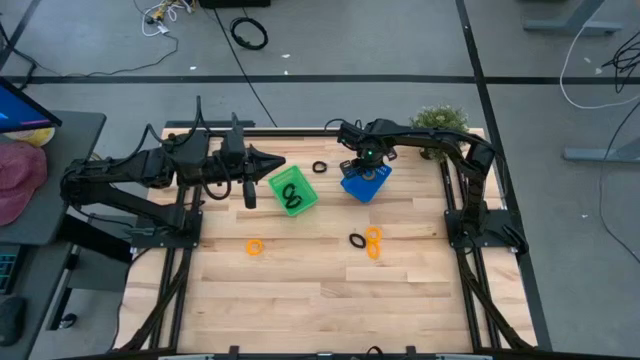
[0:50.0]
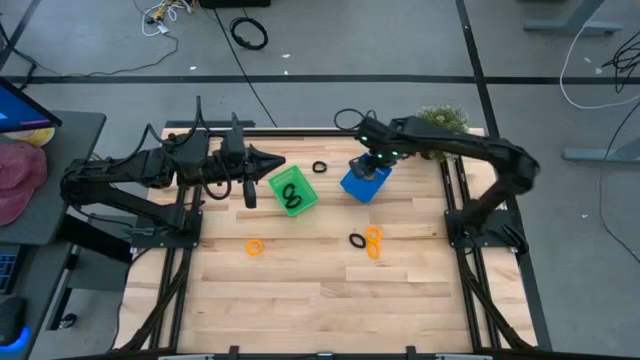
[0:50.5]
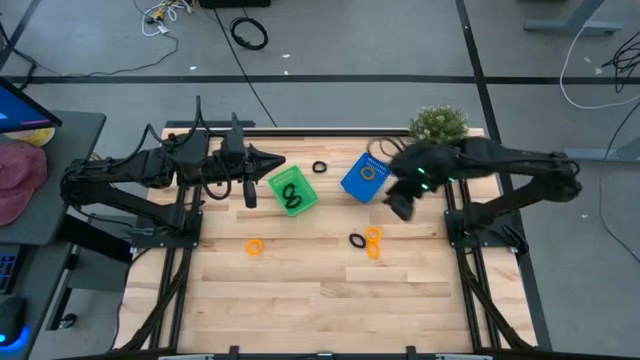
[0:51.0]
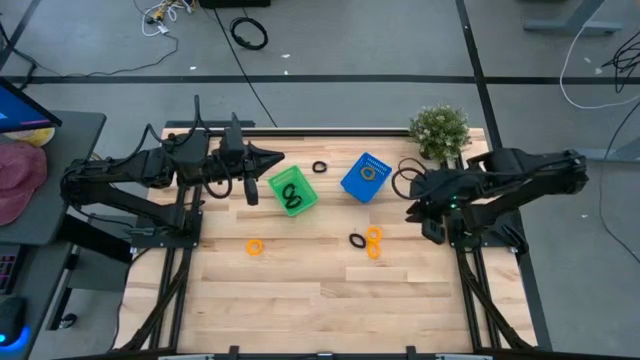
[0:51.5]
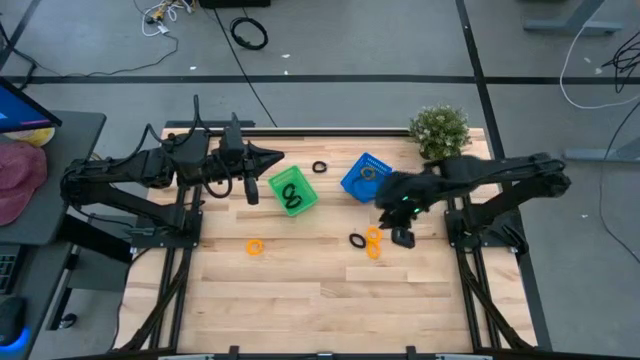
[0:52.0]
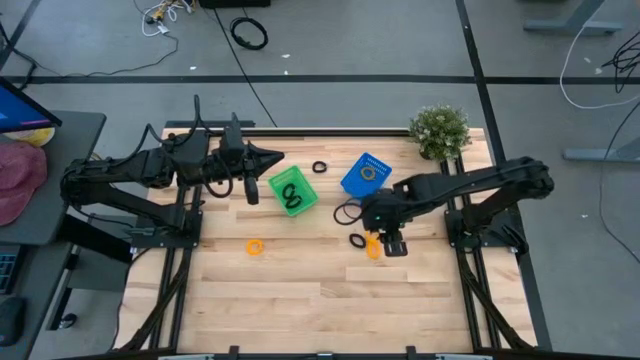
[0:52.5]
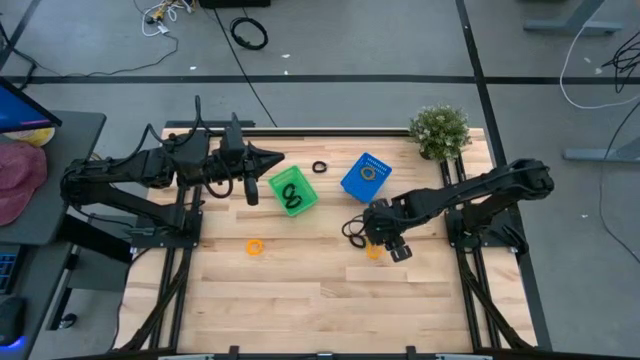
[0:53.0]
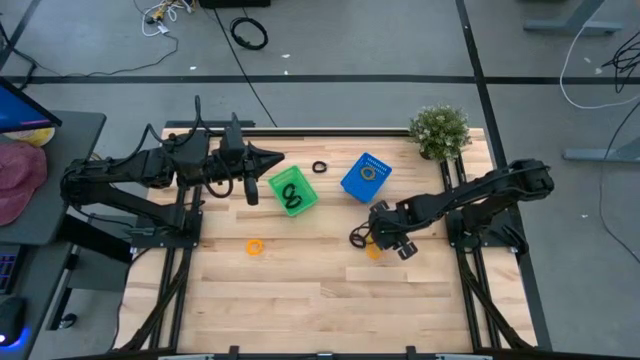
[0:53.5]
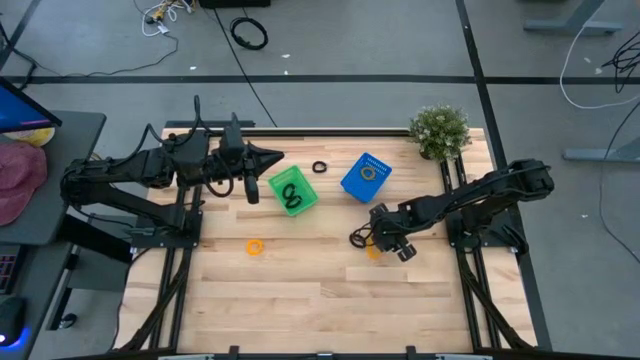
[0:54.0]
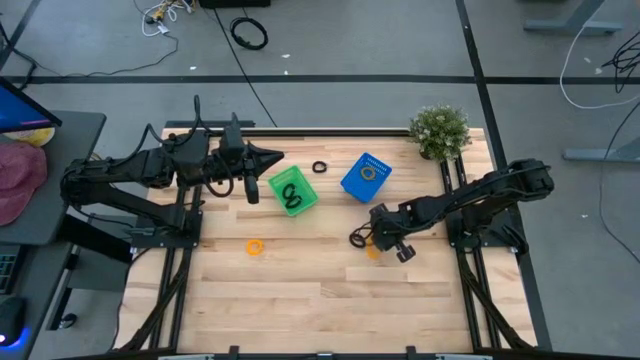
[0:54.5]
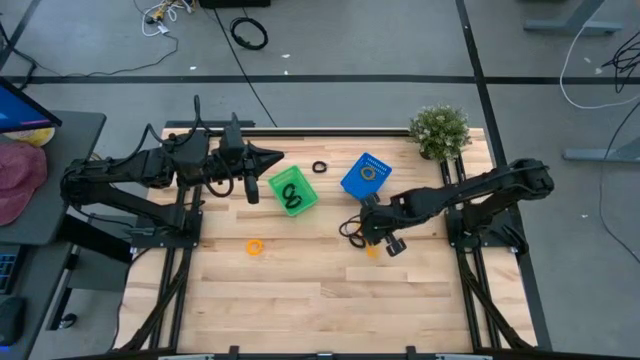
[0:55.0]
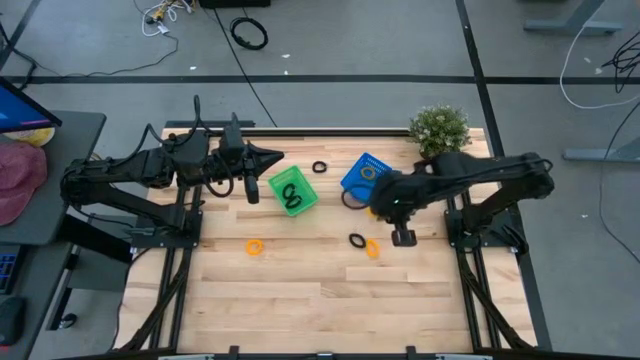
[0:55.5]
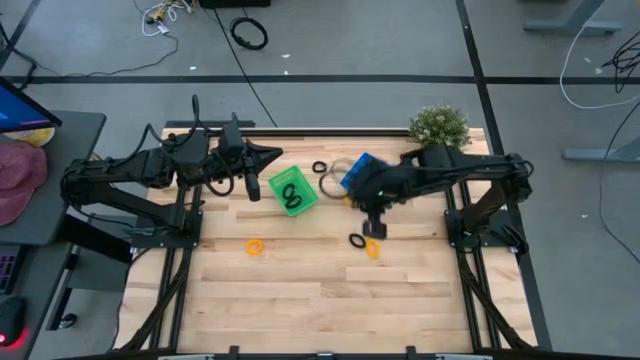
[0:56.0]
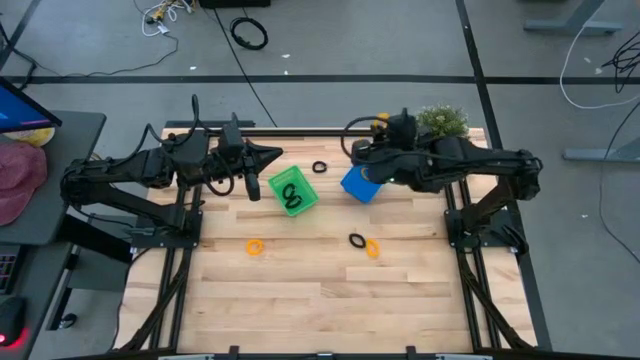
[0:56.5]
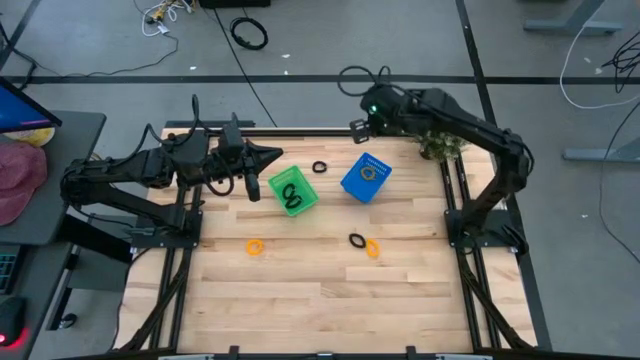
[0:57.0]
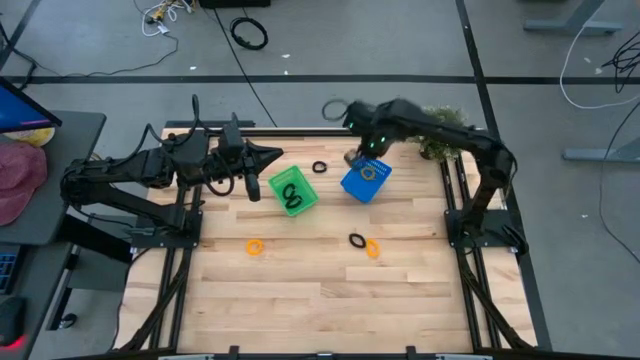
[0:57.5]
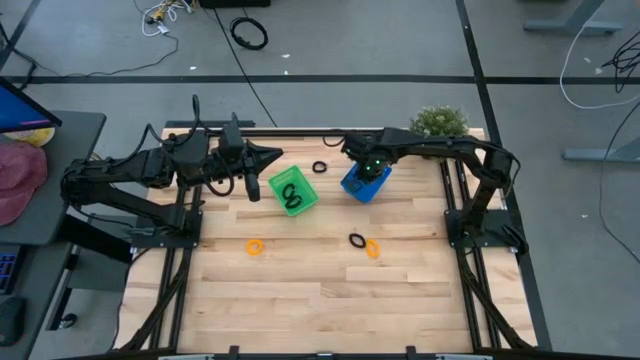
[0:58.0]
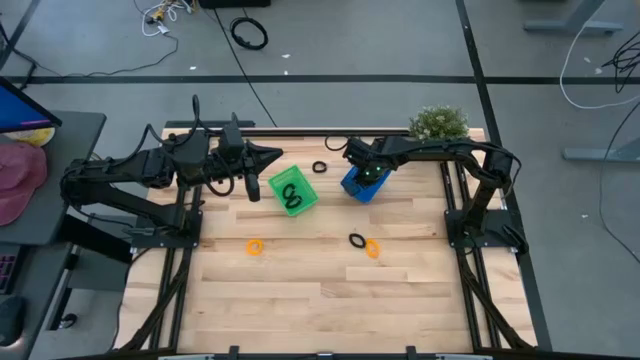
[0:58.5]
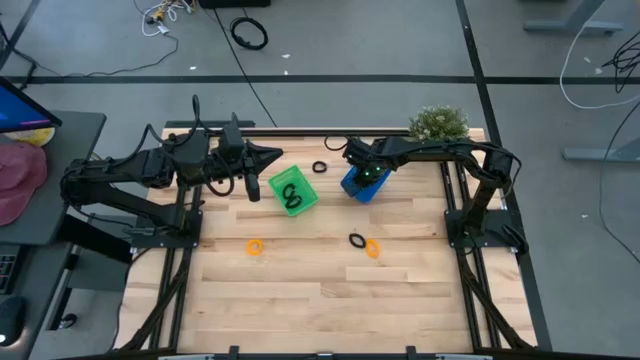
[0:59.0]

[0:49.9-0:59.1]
Task: Sort spring keychains
Put the yellow spring keychain into the blue bin

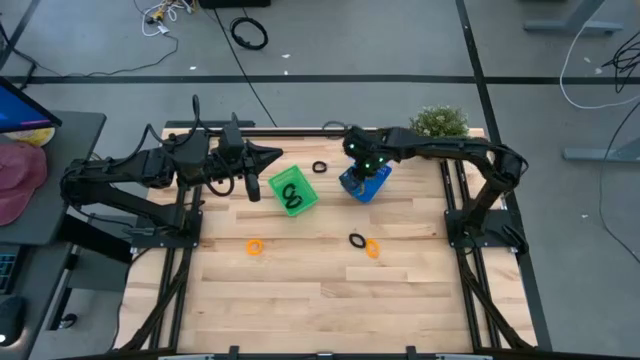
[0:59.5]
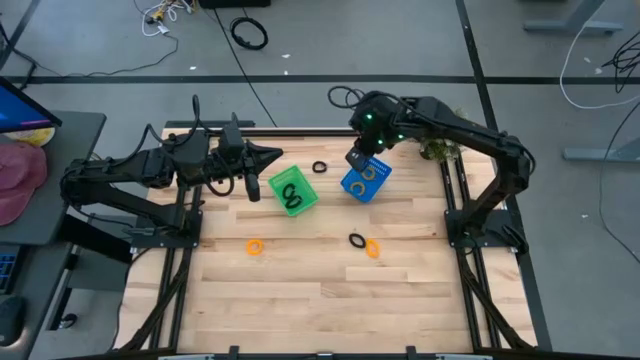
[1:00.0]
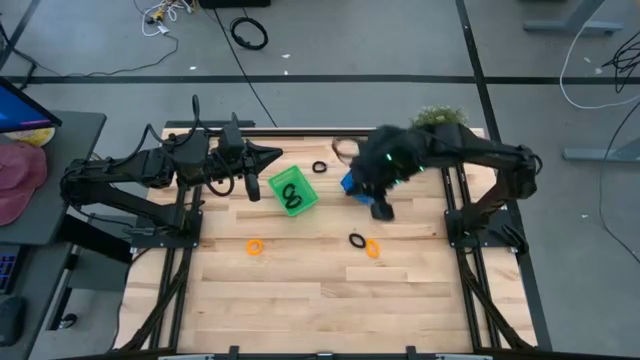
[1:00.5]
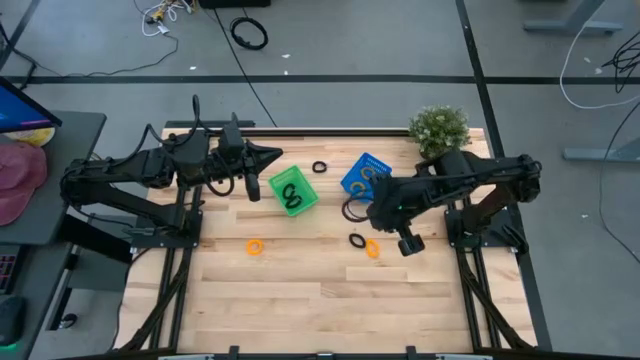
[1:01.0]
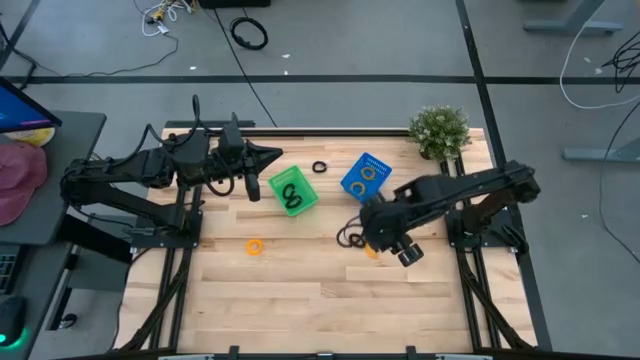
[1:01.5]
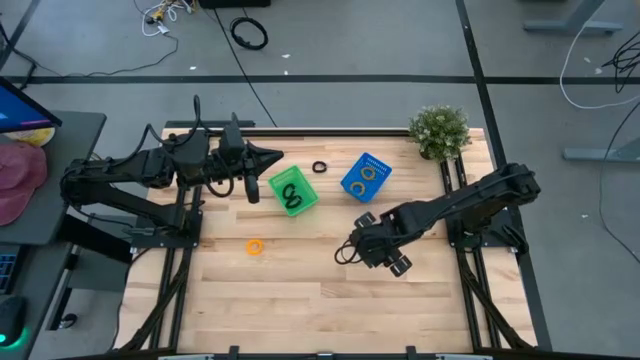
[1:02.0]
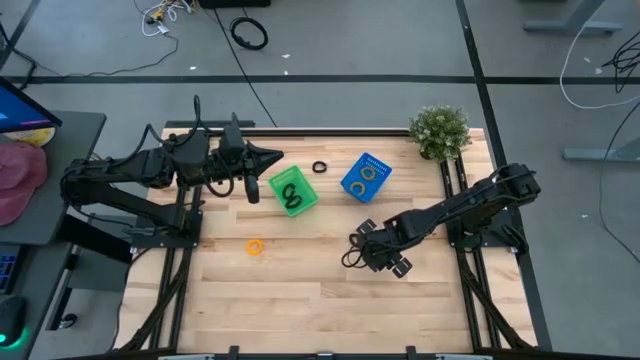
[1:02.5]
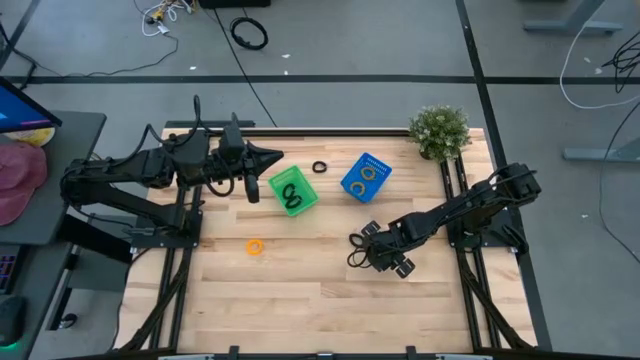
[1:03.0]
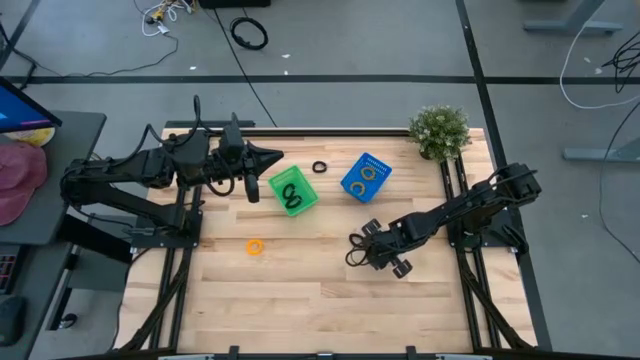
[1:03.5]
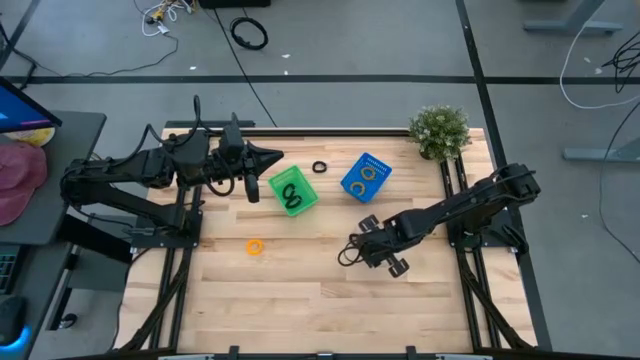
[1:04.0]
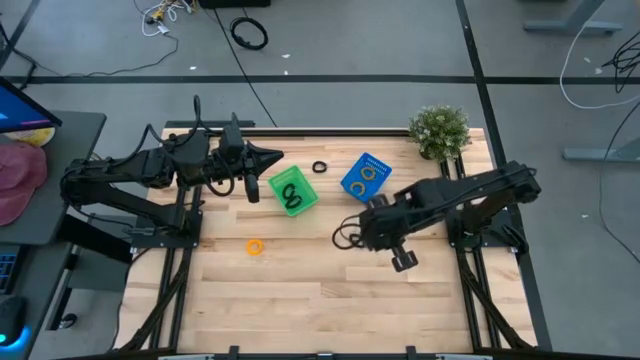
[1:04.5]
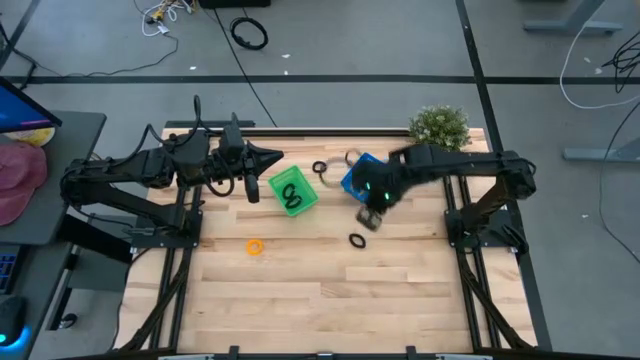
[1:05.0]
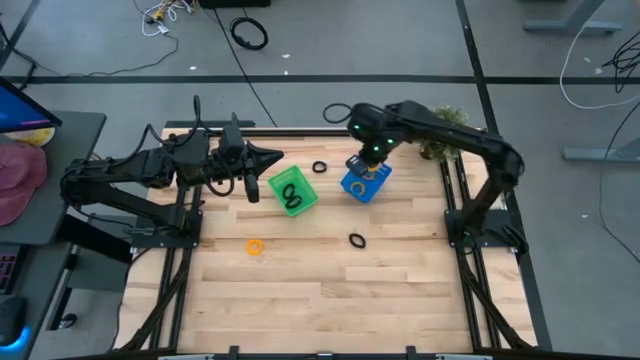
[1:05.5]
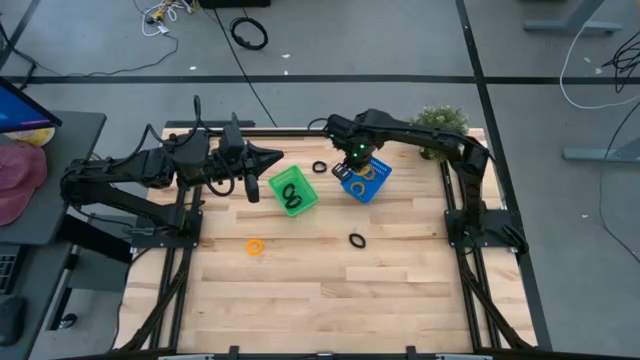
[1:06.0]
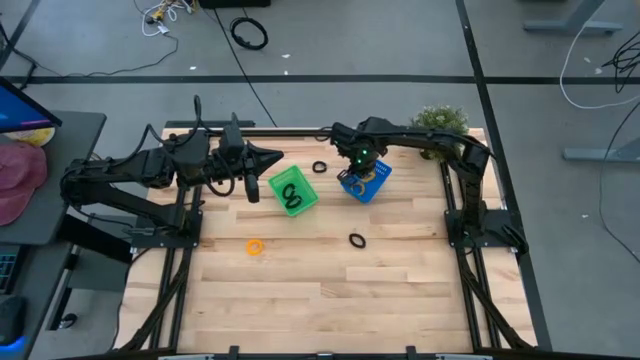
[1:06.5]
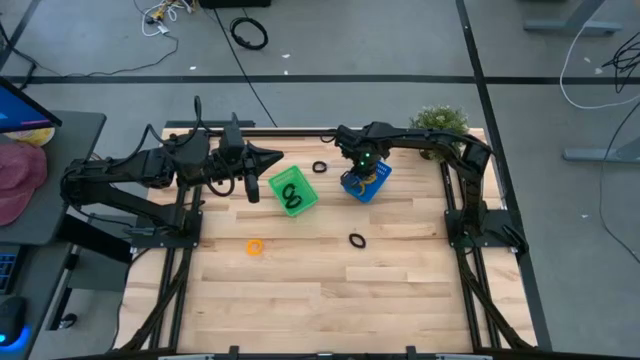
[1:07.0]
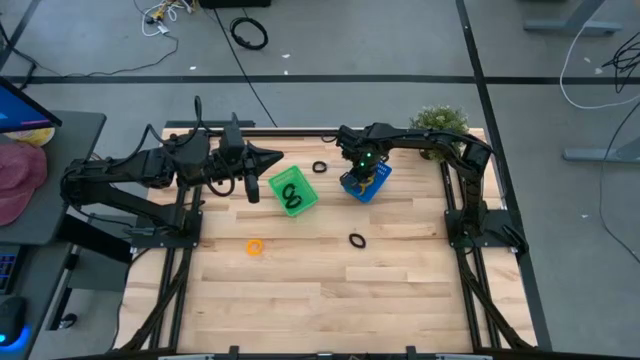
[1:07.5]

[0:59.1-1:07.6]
Put the yellow spring keychain into the blue bin
